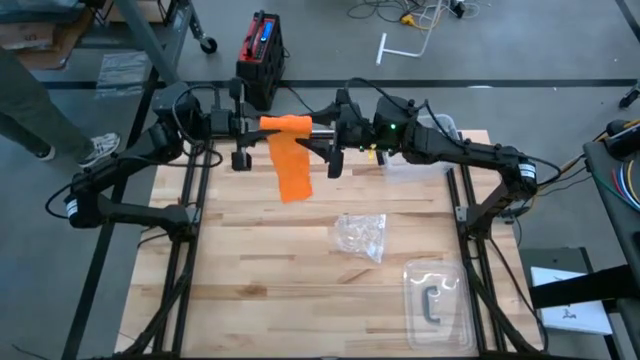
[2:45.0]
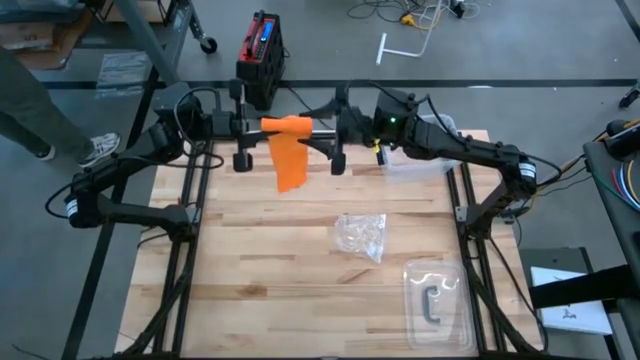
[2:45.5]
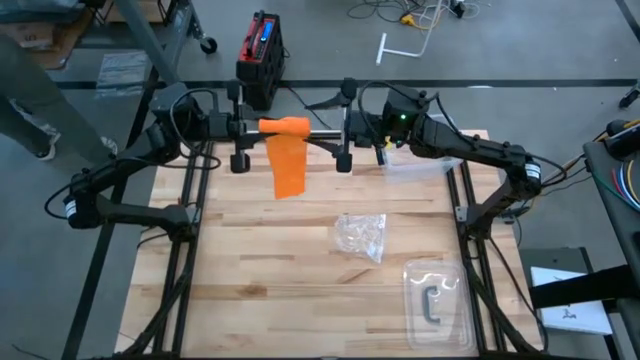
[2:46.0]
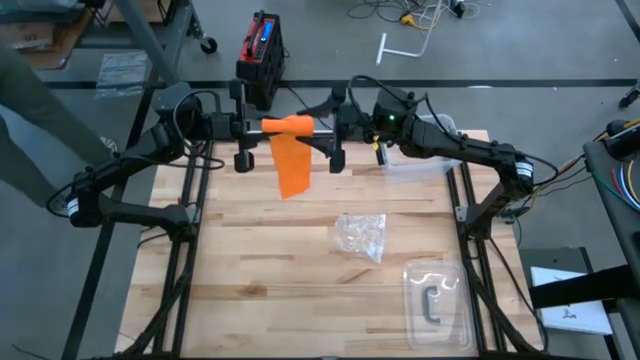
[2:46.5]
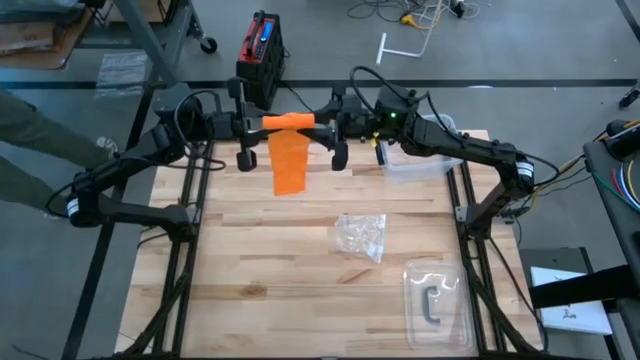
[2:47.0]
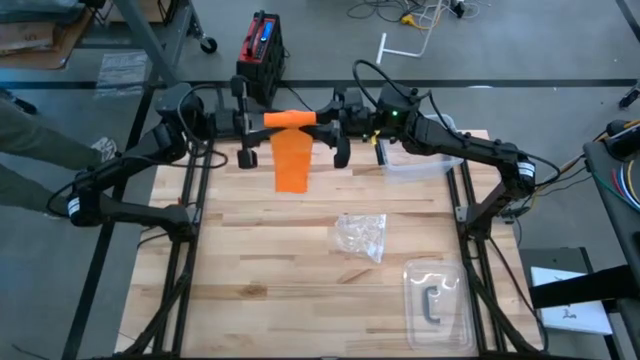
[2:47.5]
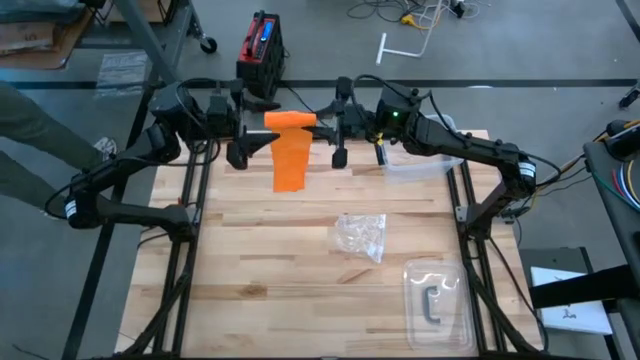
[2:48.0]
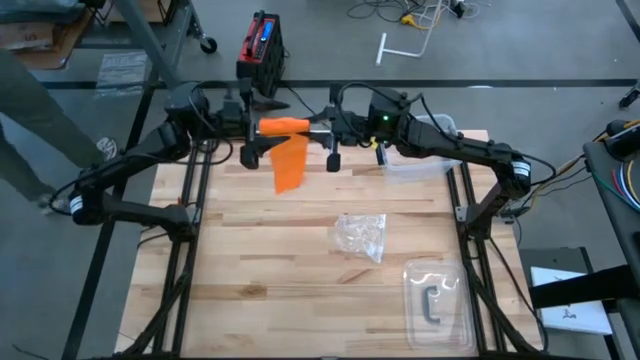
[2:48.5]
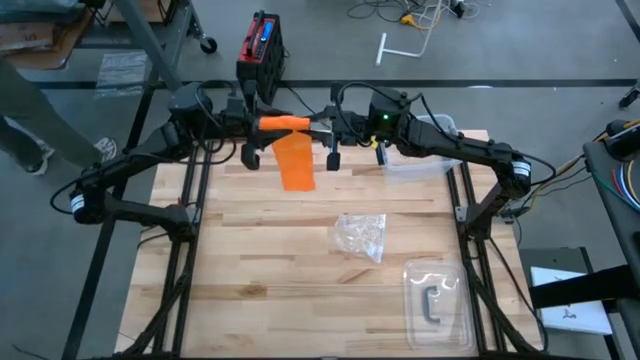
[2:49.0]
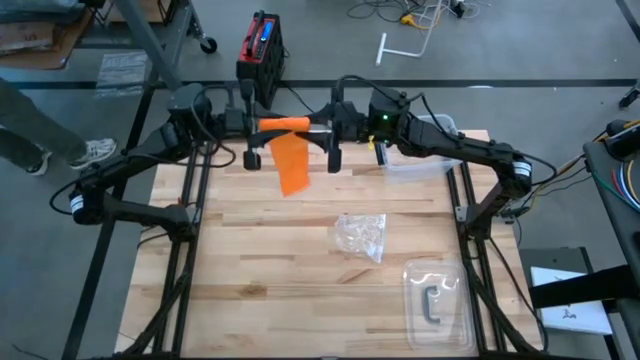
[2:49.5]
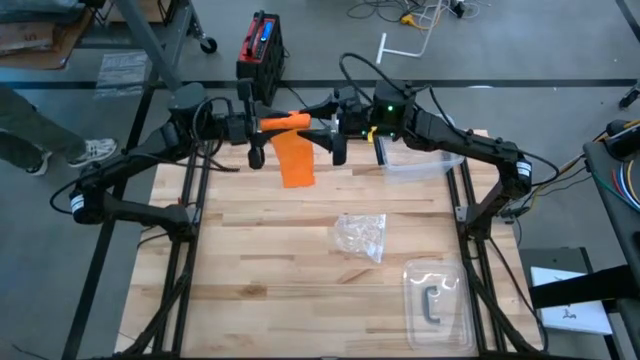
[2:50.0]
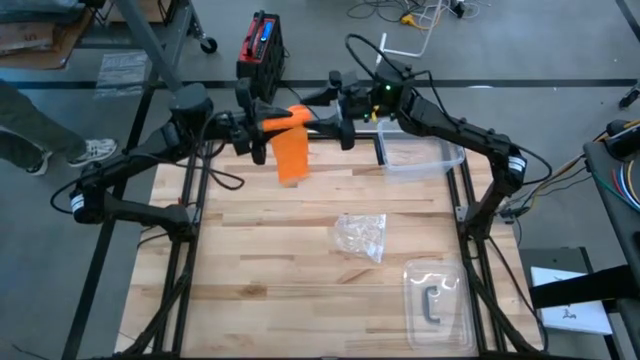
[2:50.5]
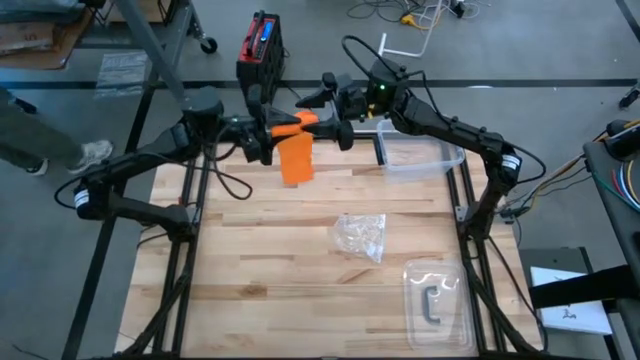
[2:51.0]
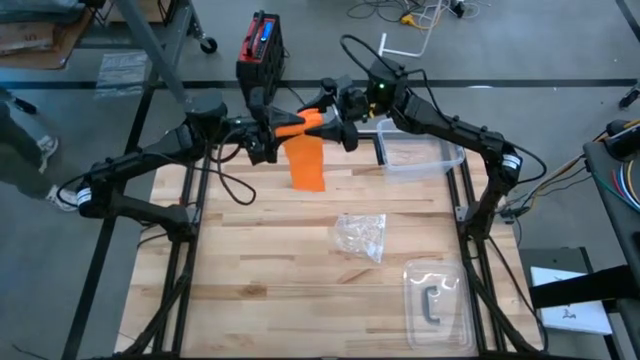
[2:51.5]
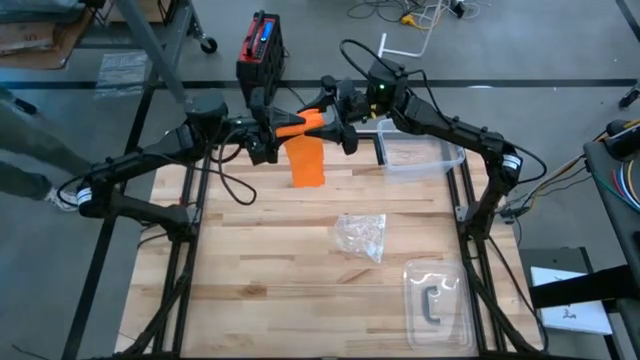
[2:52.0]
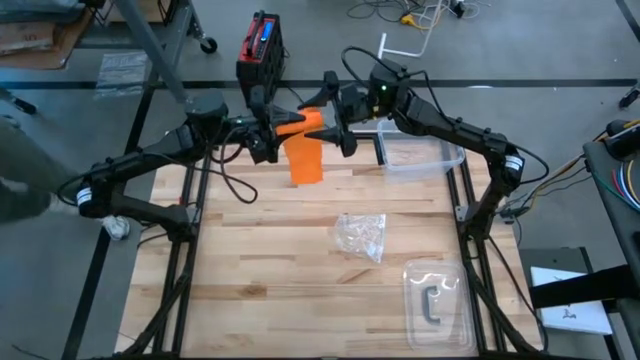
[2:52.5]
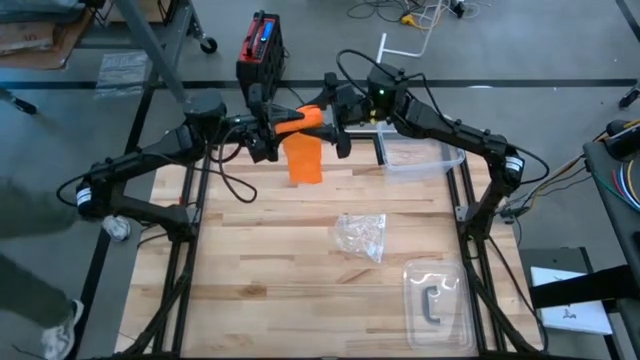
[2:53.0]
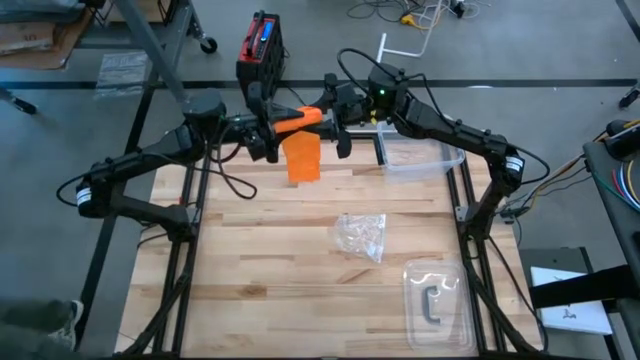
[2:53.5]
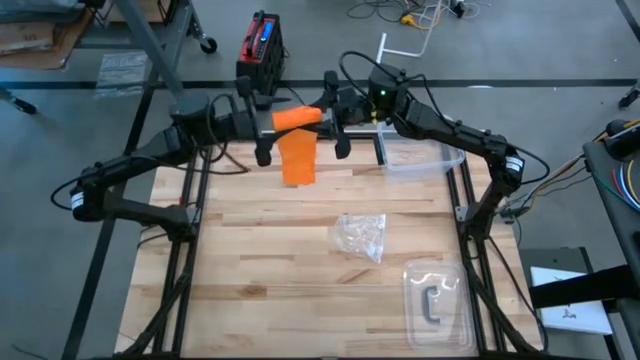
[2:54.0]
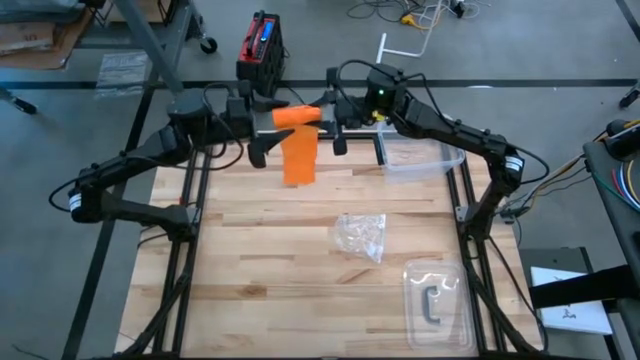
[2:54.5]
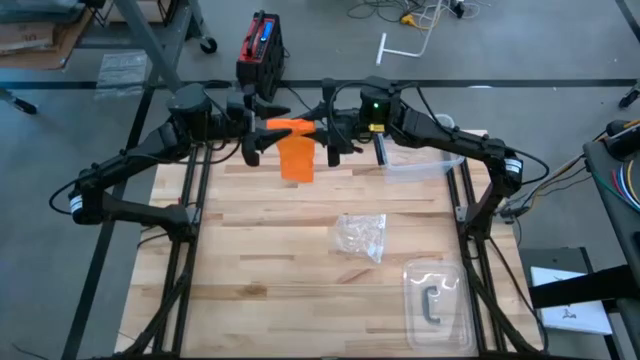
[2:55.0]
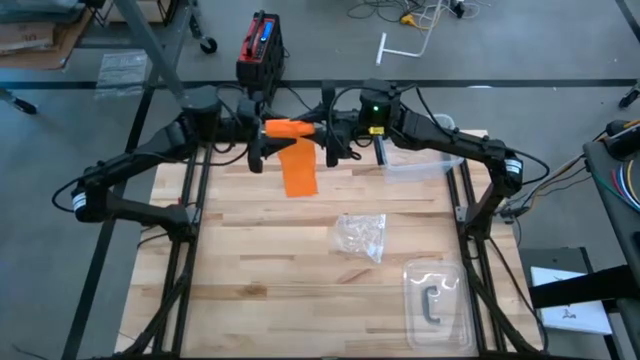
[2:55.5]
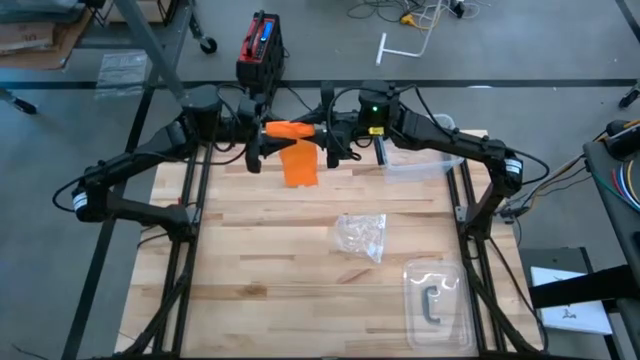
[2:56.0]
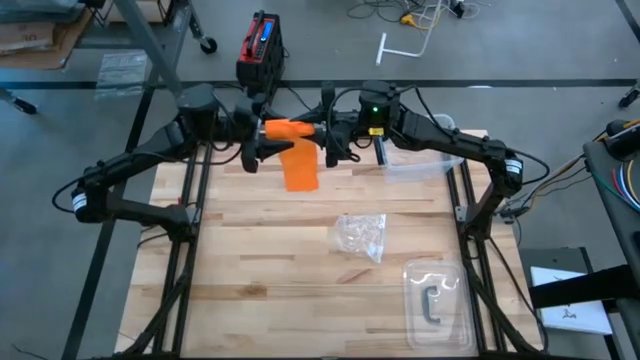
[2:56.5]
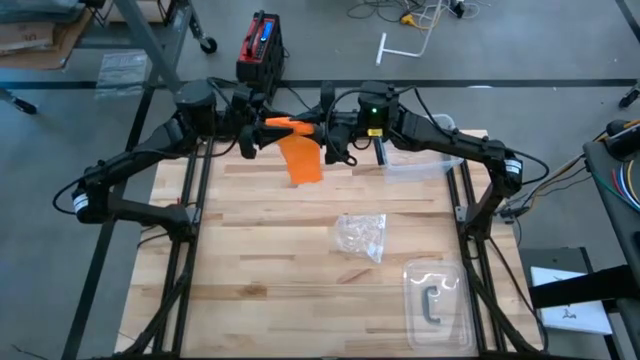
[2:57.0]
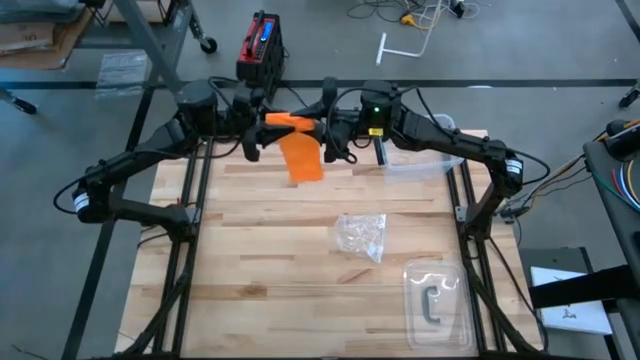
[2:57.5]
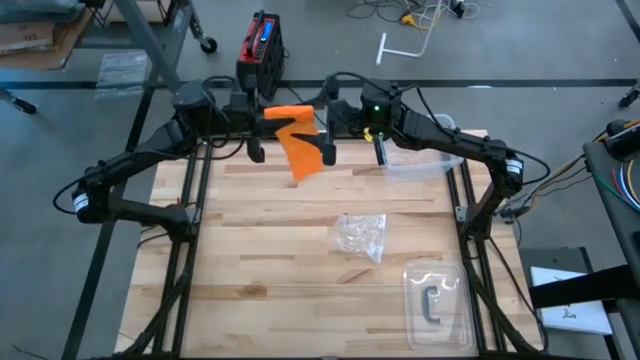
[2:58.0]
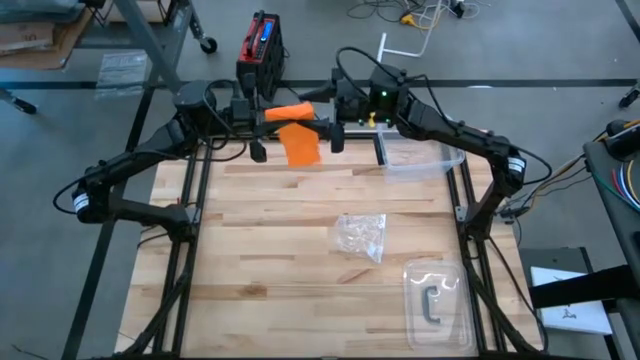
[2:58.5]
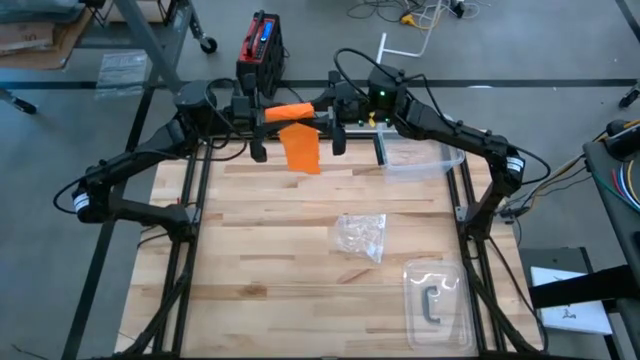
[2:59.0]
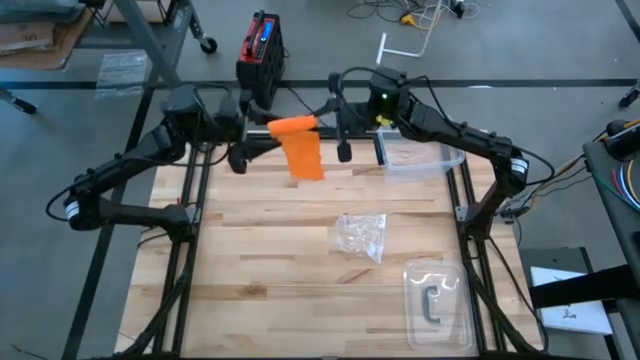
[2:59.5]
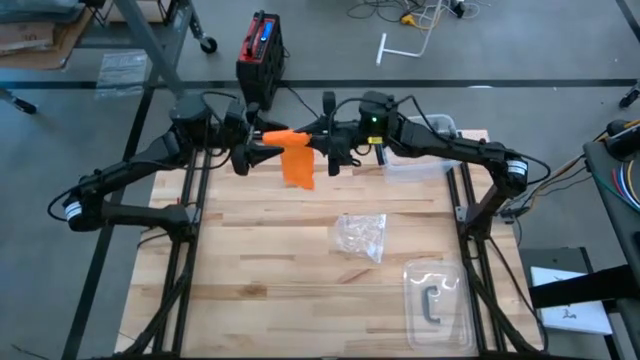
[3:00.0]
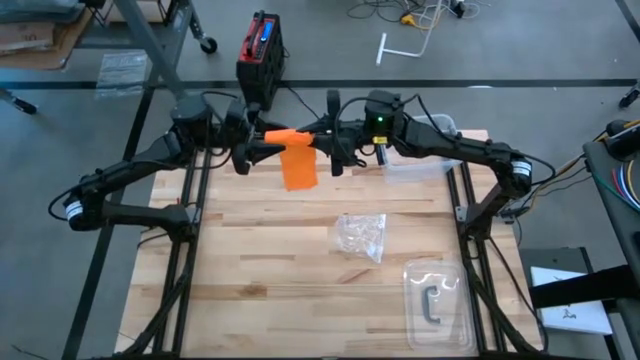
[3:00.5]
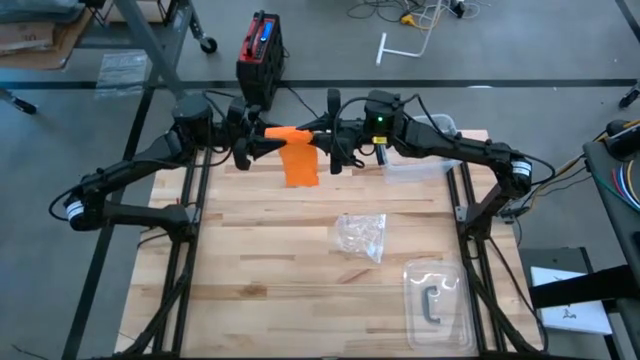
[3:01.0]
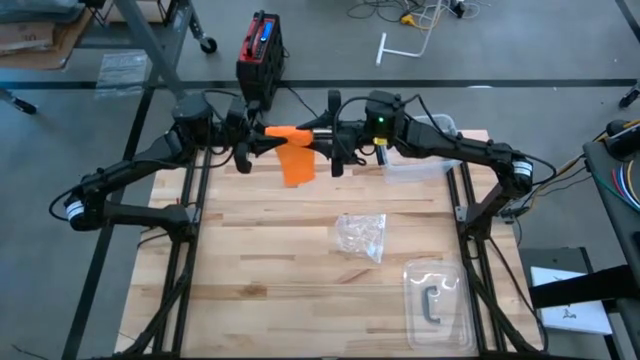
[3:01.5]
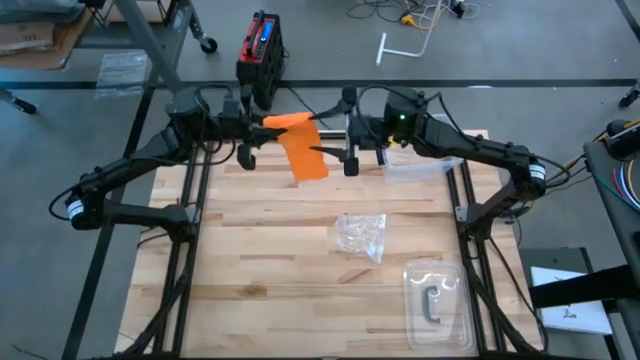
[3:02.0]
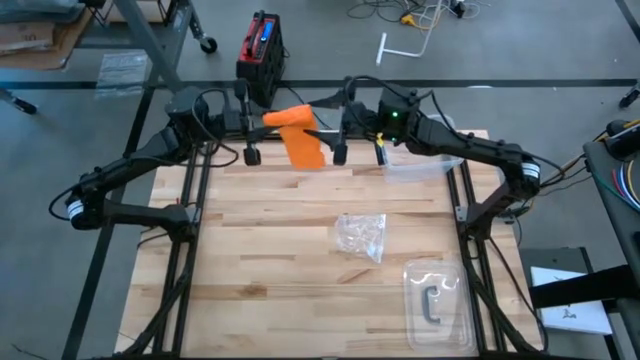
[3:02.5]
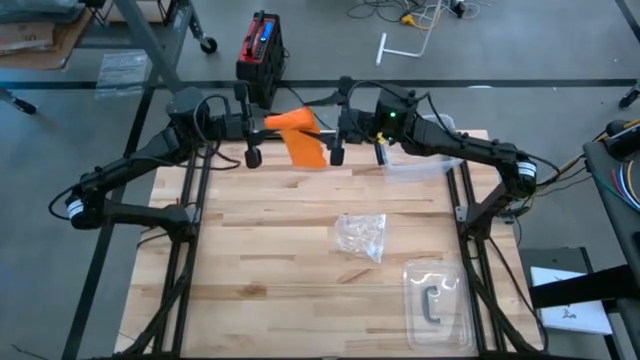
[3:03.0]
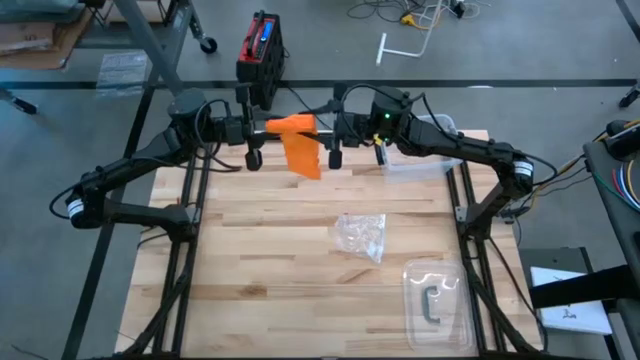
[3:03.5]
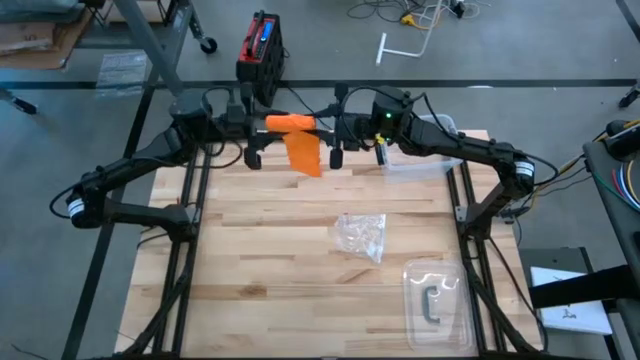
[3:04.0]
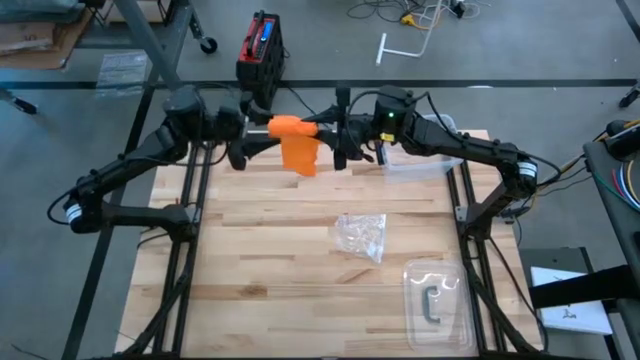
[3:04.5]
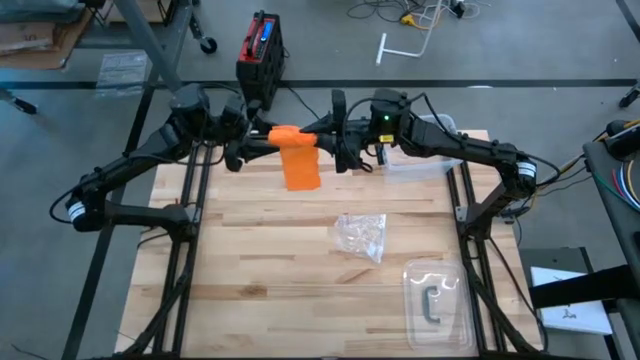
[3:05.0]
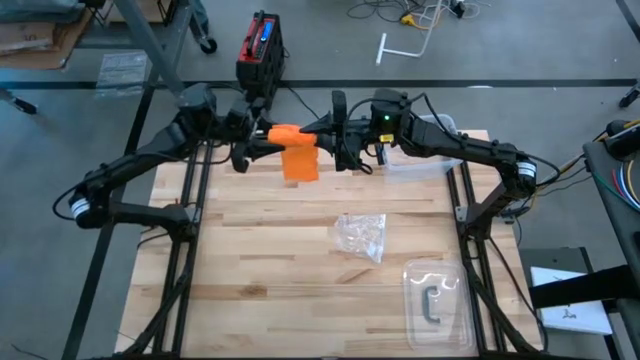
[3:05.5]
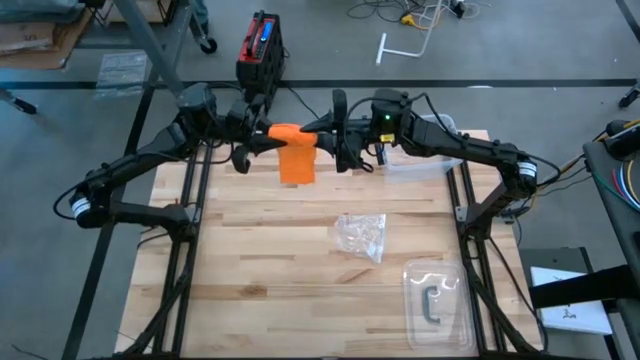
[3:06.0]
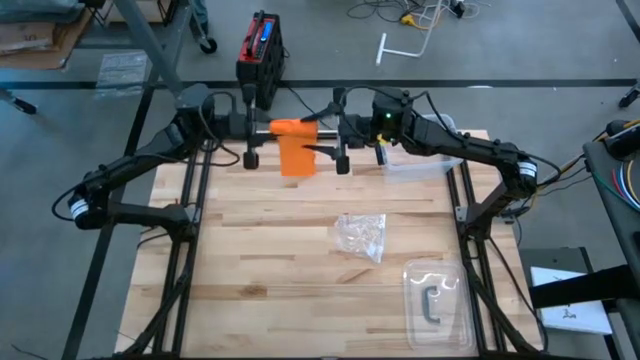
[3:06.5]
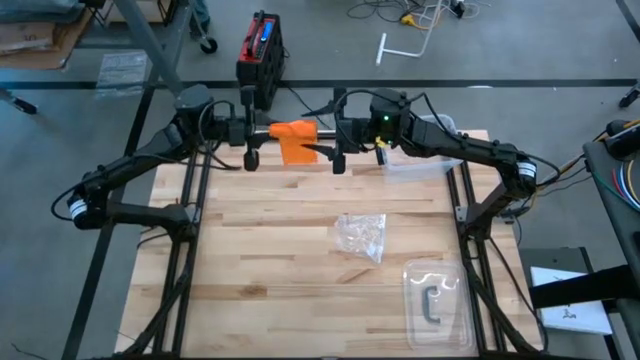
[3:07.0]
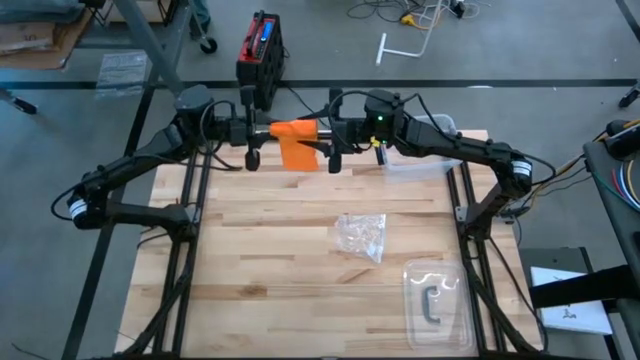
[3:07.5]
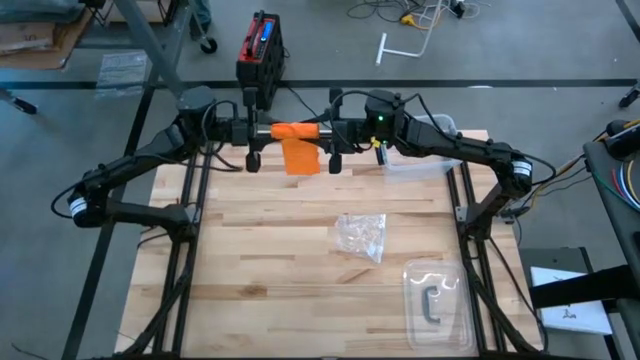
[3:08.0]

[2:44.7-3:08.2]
Task: Roll bandage
Roll the orange bandage
